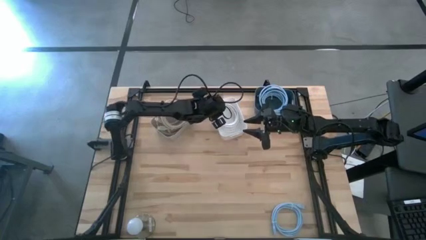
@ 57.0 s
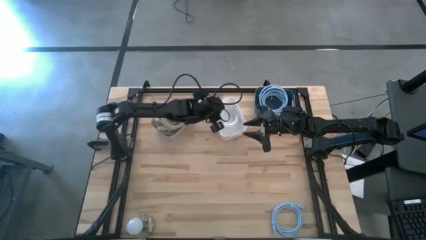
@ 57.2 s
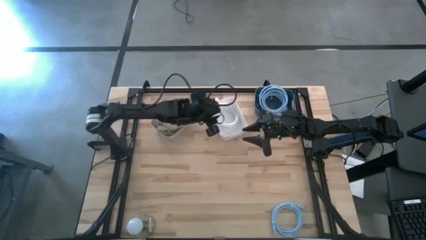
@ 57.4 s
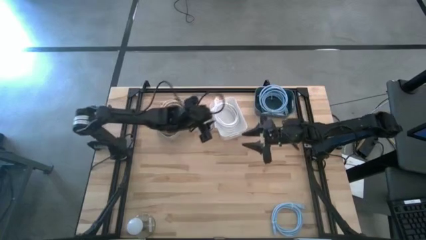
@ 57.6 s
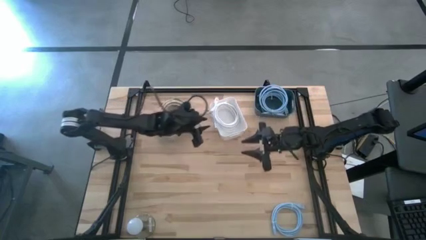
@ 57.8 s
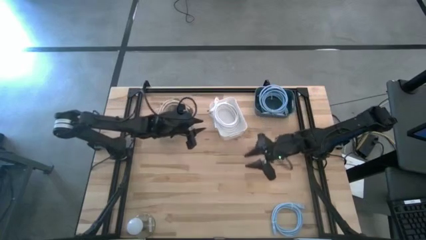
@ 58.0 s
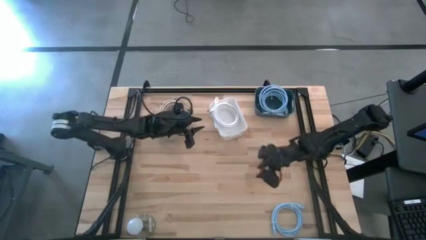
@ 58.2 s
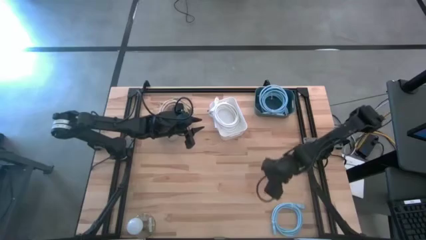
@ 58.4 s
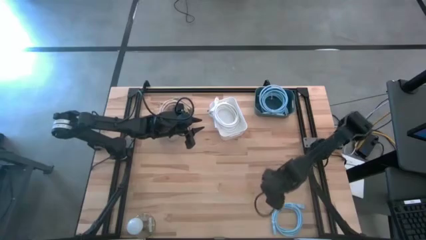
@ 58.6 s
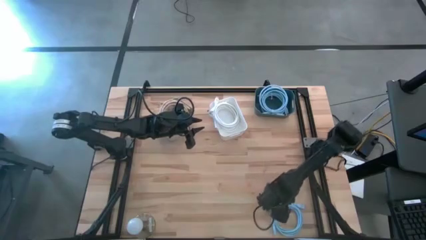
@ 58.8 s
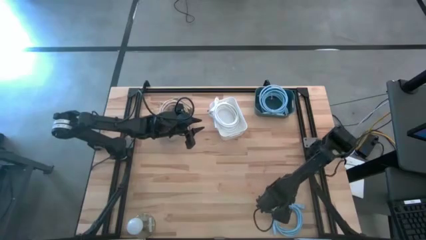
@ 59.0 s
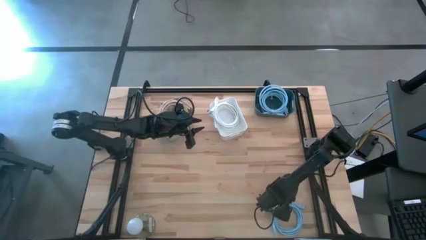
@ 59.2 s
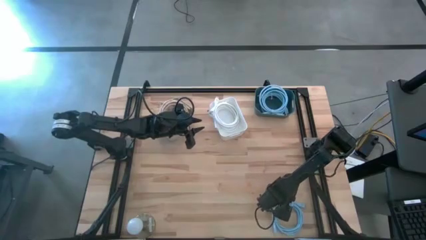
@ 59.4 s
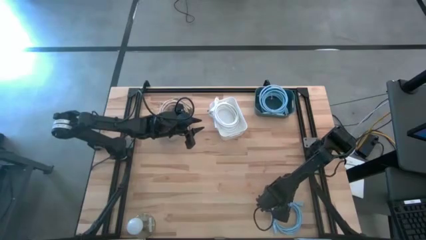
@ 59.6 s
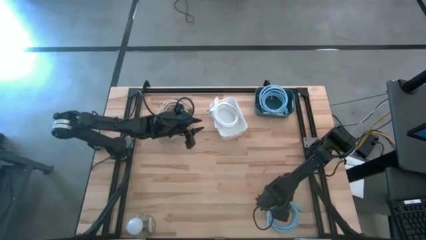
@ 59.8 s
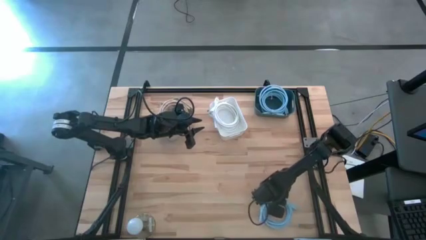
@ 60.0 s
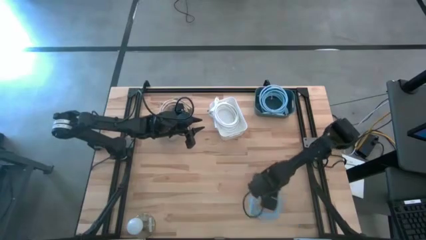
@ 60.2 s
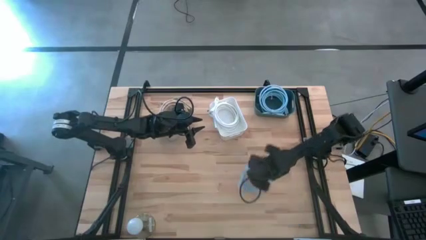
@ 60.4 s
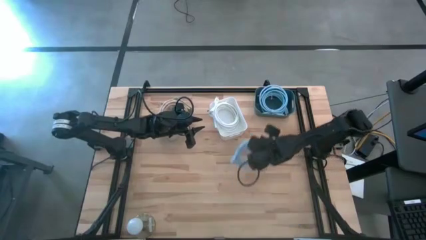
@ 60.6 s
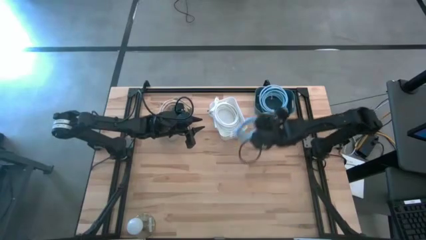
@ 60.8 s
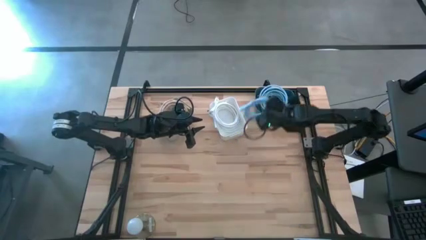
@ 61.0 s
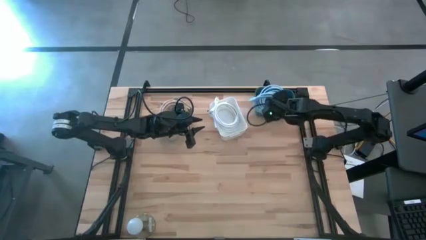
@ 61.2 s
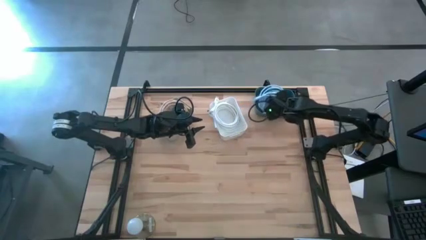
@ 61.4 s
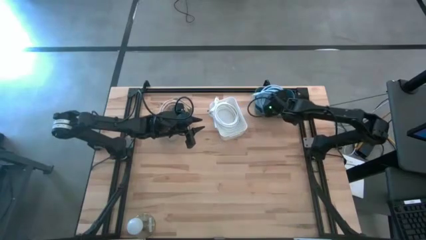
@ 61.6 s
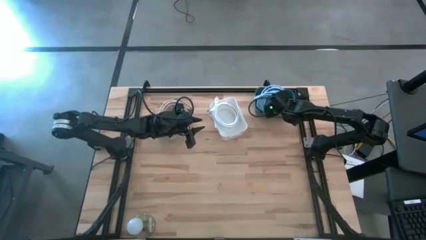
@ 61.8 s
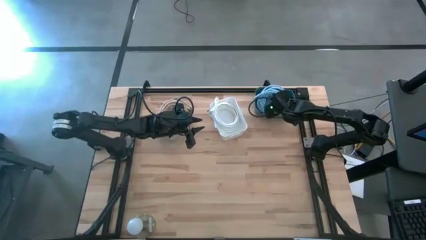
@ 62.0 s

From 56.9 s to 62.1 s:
Task: Sort HDMI cables
Put the light blue hdmi cable into the blue bin

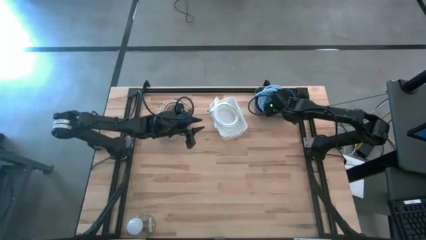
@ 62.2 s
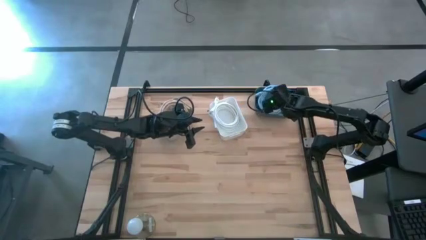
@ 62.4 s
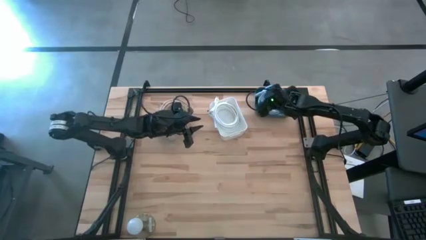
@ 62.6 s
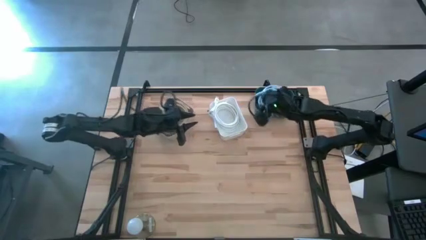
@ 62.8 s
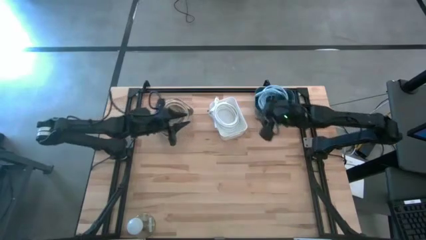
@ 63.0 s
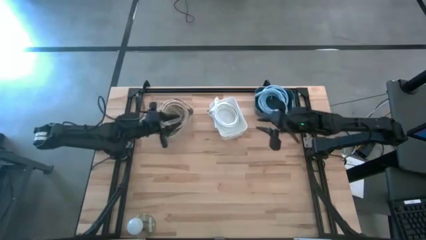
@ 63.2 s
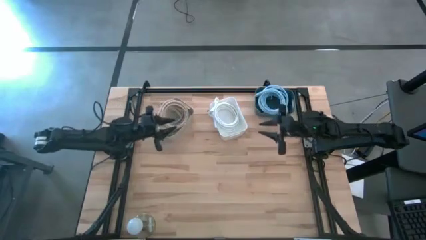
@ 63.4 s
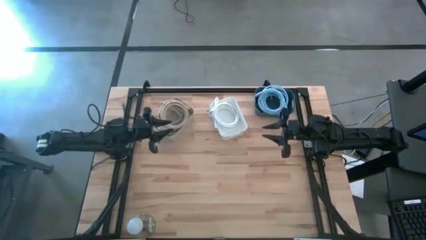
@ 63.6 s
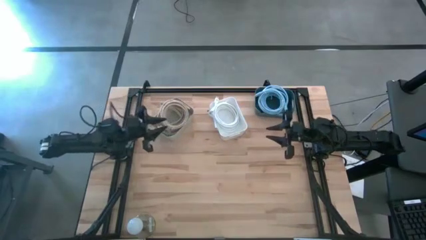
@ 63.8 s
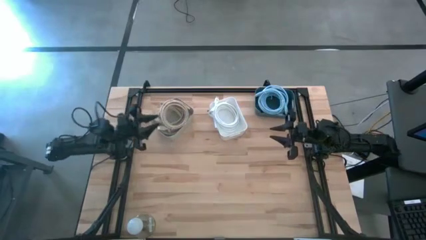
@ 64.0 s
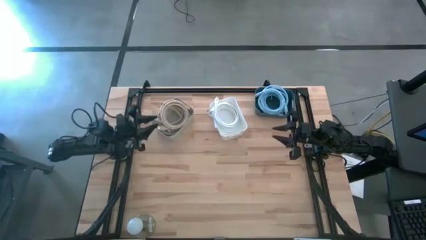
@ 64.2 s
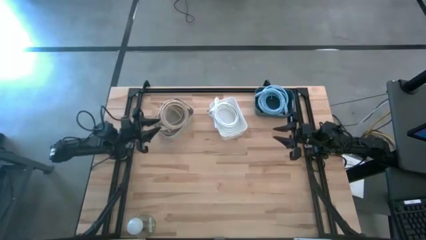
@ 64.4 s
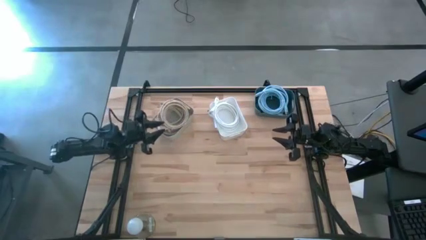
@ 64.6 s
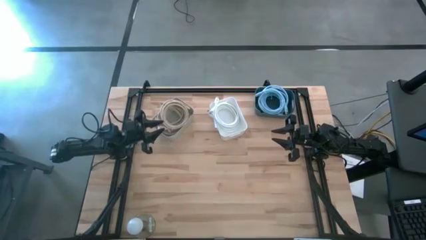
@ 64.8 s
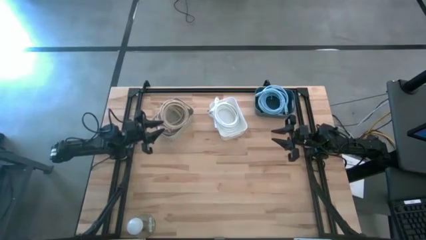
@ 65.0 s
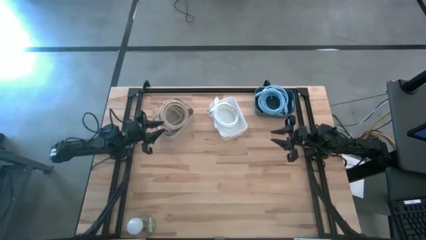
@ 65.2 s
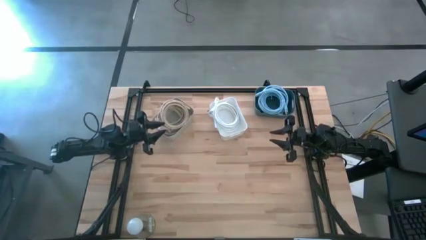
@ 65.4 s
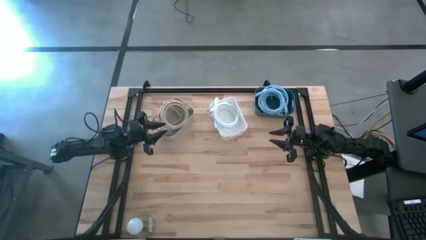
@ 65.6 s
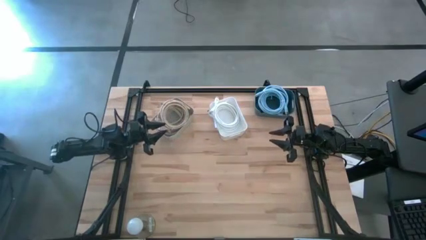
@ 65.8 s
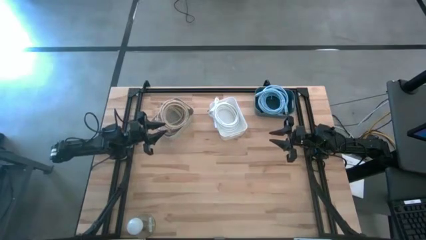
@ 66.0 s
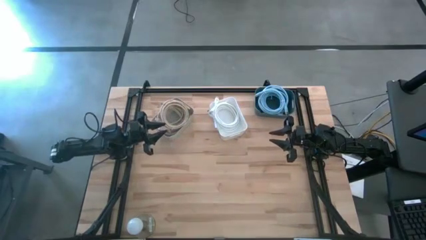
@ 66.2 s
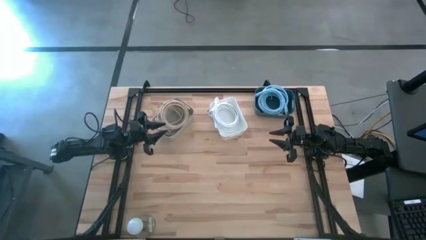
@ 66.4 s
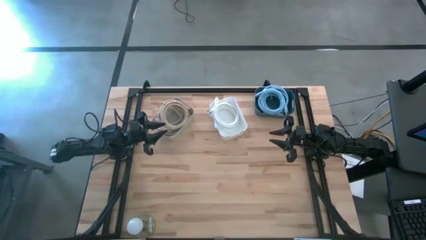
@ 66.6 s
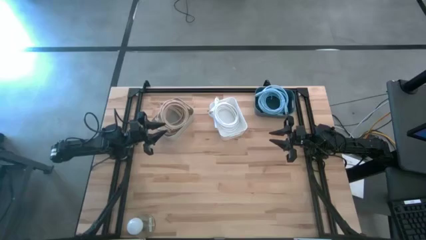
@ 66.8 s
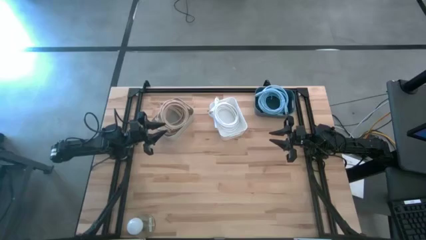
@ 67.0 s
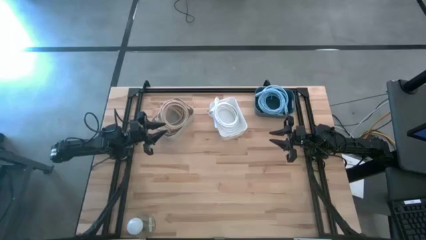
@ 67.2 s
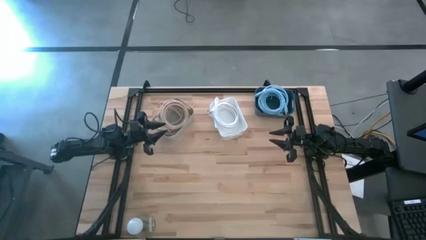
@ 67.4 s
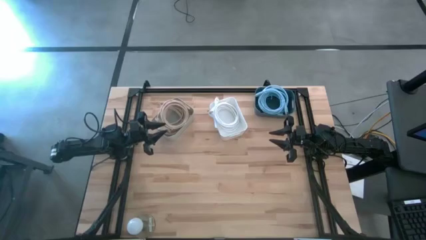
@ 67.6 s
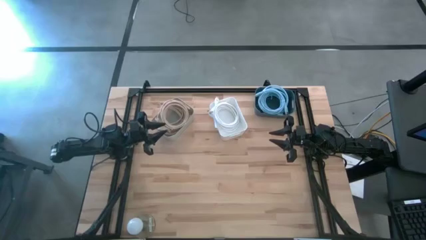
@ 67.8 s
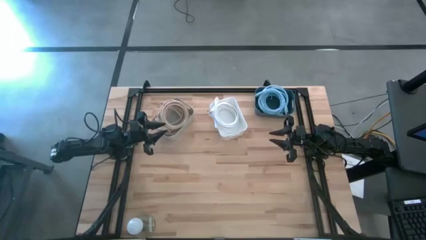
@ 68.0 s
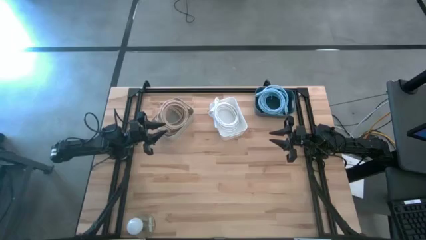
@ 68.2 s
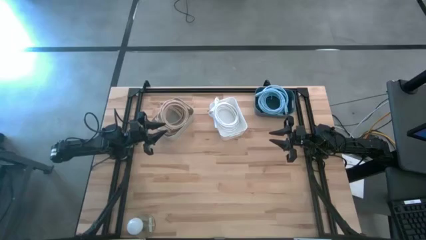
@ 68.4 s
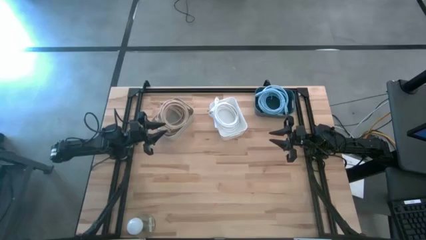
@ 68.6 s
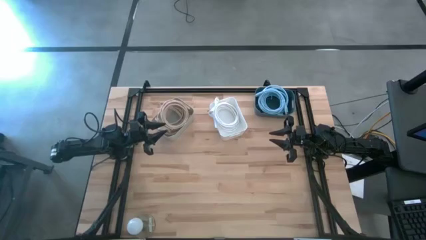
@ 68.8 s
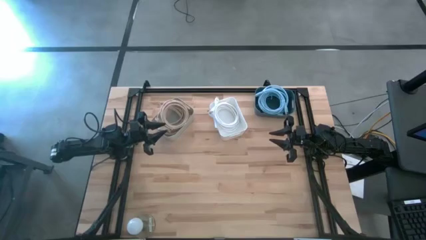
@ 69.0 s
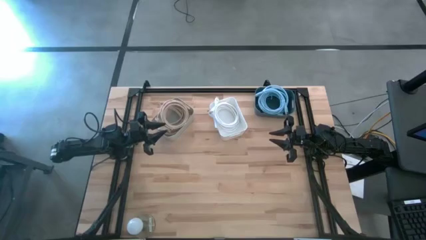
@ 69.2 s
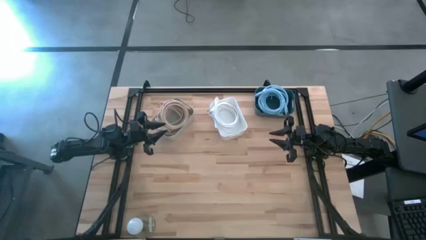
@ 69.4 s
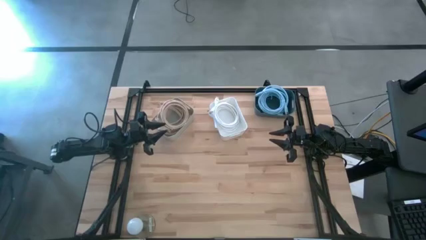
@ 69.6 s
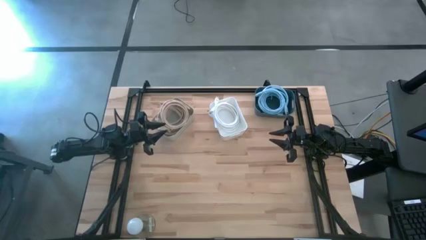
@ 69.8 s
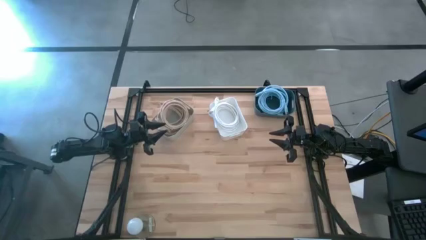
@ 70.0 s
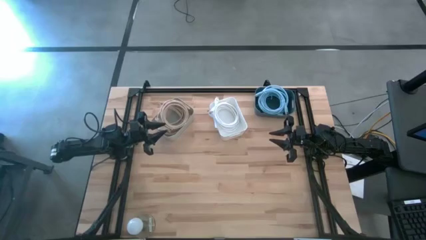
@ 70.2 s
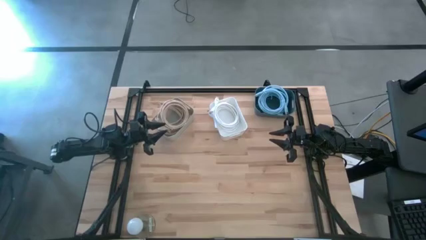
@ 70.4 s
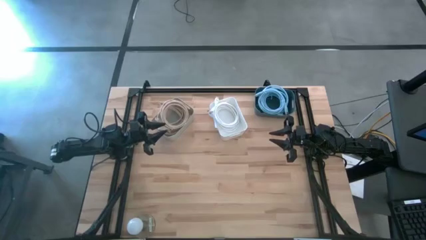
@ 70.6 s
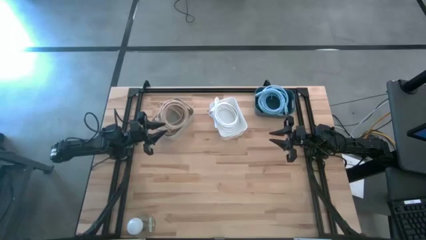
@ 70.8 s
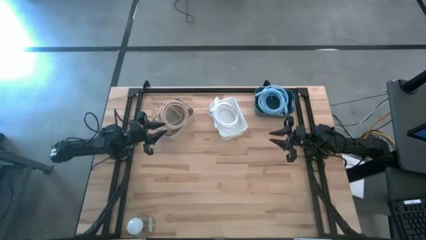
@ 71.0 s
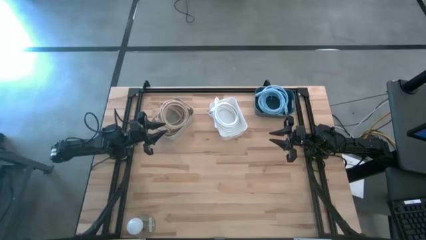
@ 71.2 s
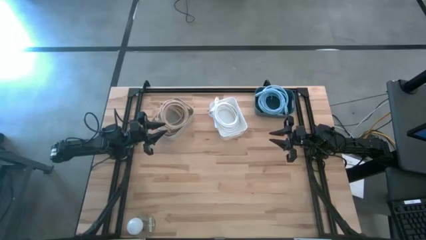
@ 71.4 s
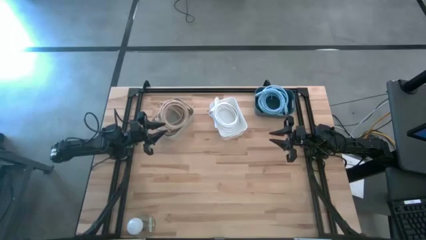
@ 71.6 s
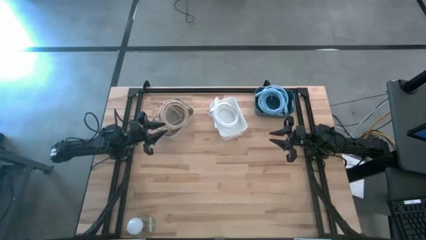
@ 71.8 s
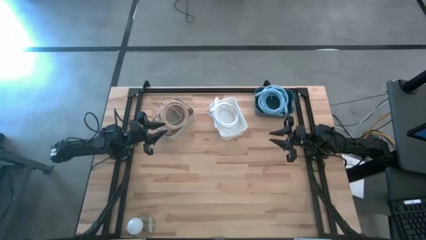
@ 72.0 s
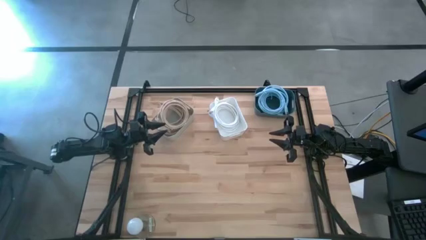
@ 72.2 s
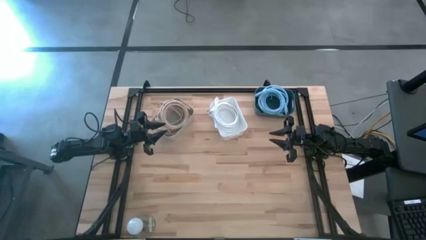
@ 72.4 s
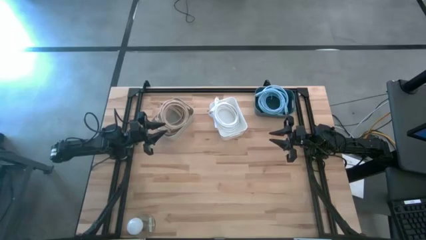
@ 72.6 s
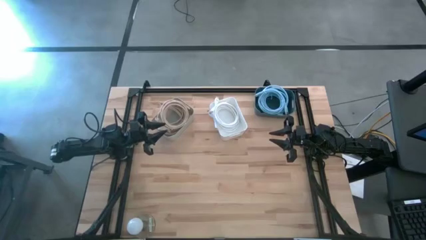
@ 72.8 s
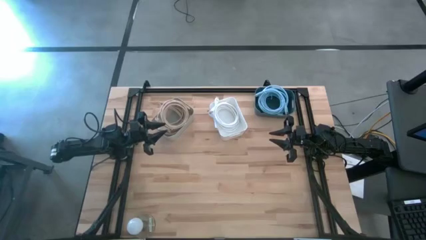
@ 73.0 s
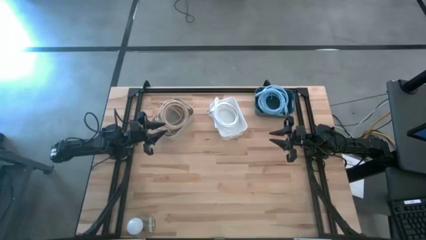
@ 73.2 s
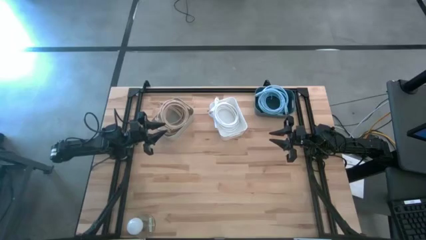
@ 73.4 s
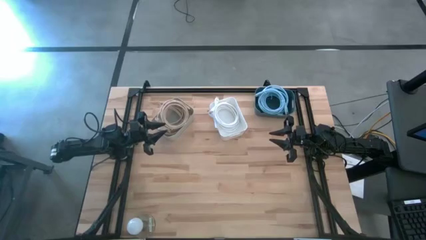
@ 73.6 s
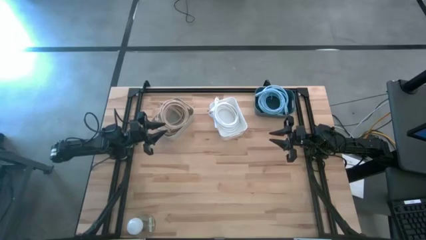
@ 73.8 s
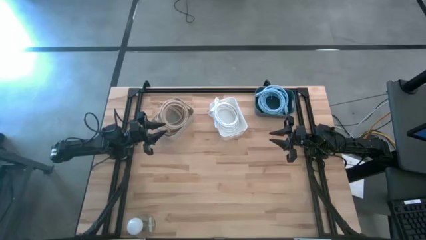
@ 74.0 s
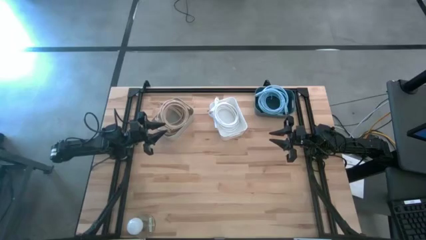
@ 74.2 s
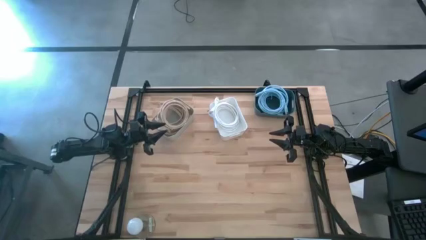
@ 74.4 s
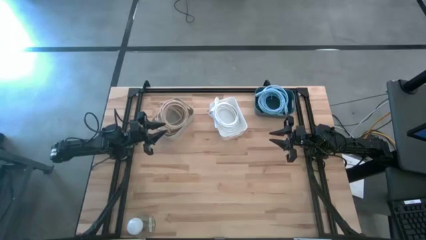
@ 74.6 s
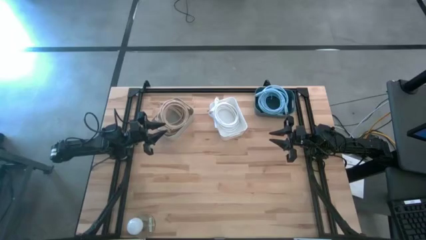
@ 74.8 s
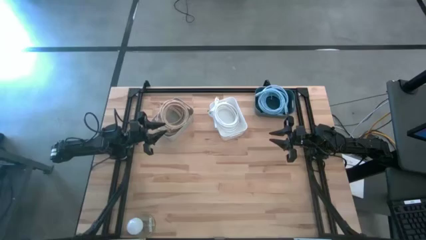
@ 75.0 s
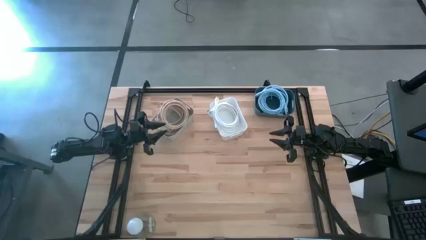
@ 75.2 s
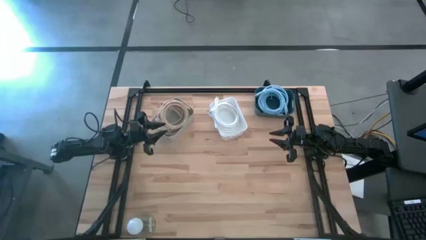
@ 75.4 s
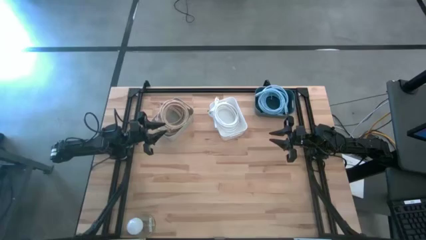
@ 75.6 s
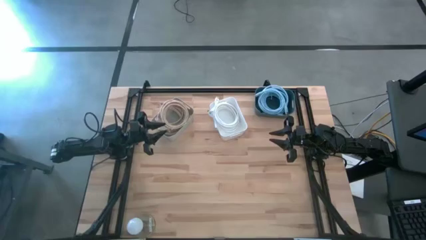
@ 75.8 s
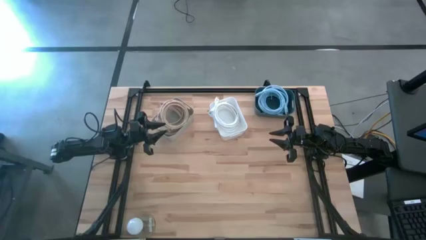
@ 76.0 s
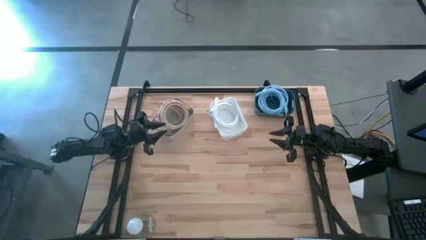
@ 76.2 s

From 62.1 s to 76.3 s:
Return to Home Position
